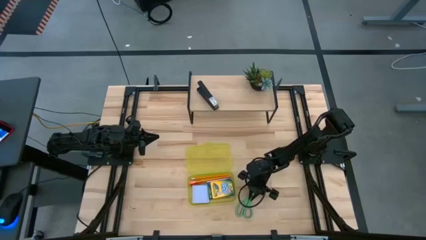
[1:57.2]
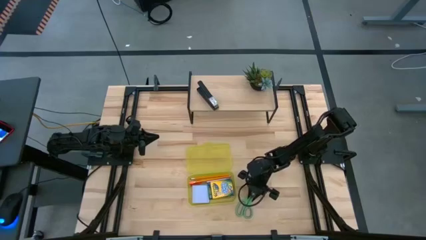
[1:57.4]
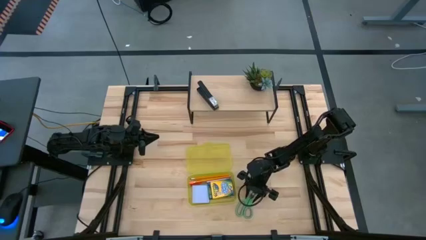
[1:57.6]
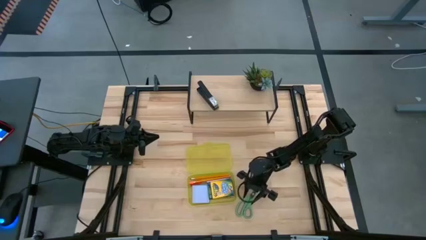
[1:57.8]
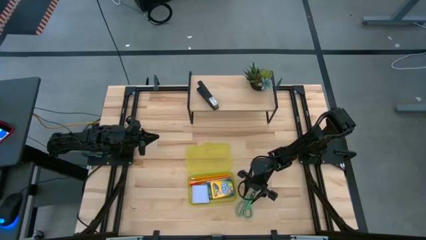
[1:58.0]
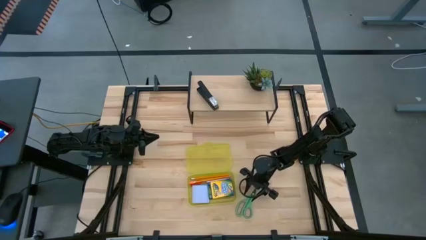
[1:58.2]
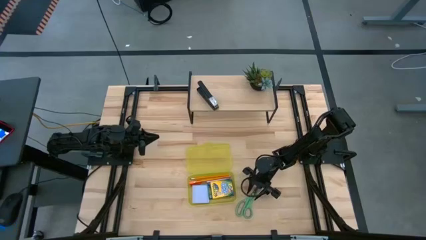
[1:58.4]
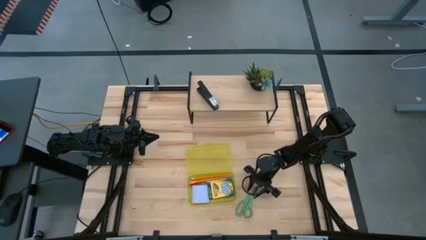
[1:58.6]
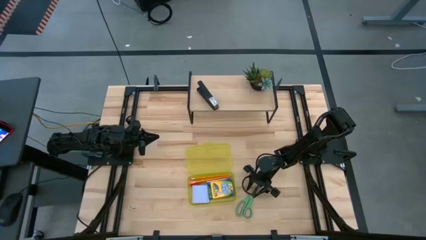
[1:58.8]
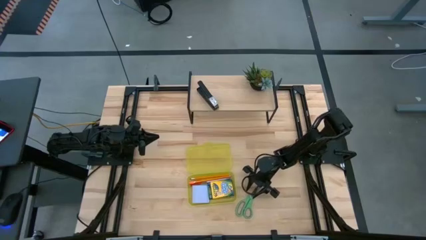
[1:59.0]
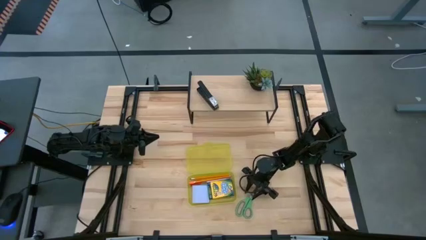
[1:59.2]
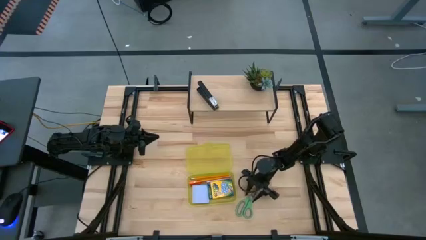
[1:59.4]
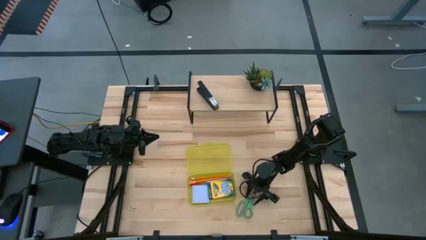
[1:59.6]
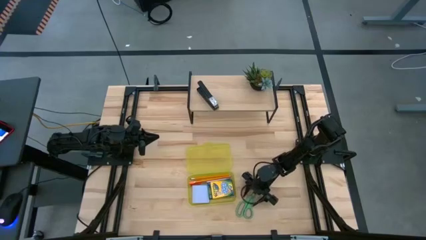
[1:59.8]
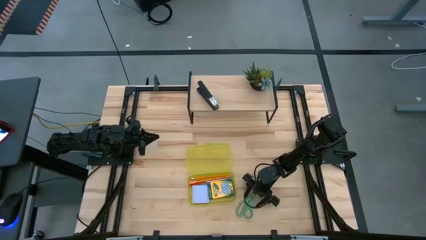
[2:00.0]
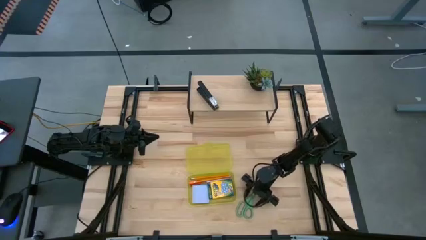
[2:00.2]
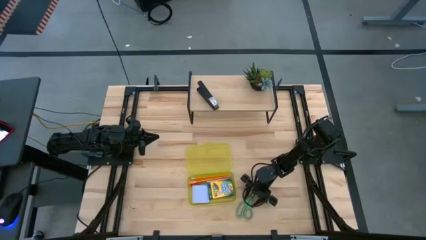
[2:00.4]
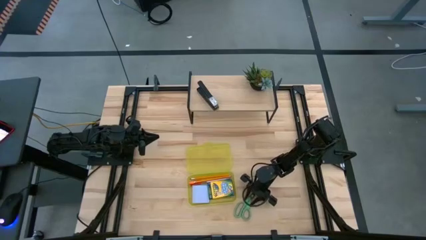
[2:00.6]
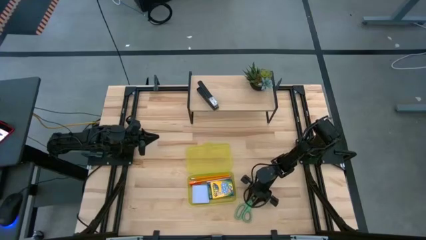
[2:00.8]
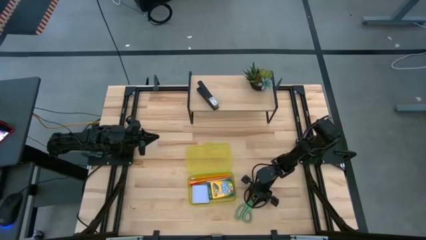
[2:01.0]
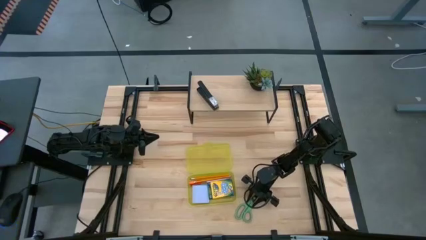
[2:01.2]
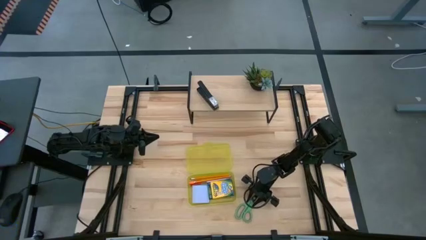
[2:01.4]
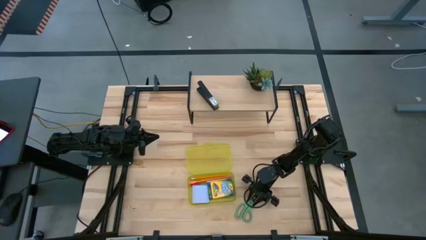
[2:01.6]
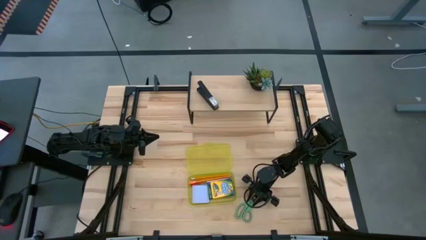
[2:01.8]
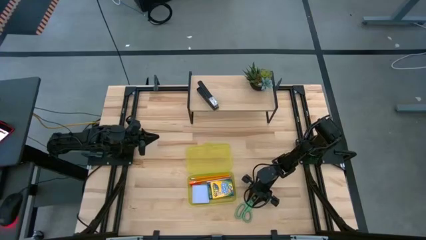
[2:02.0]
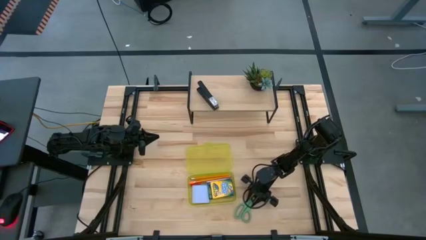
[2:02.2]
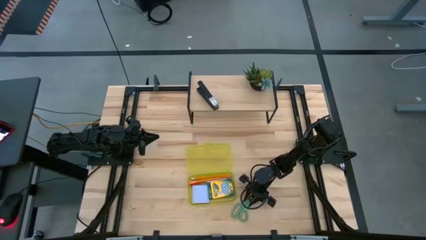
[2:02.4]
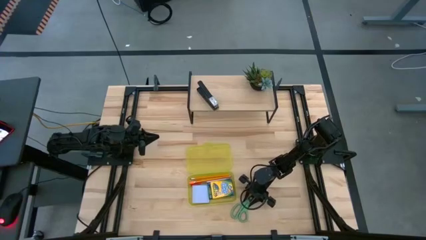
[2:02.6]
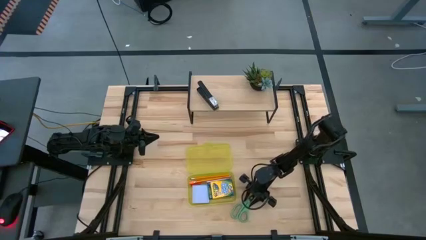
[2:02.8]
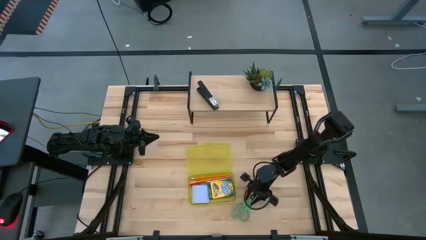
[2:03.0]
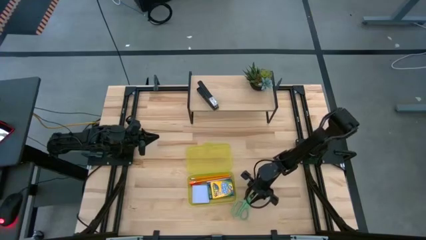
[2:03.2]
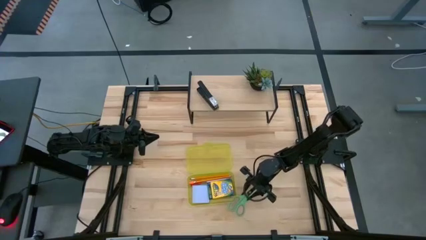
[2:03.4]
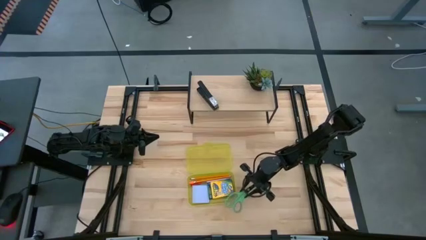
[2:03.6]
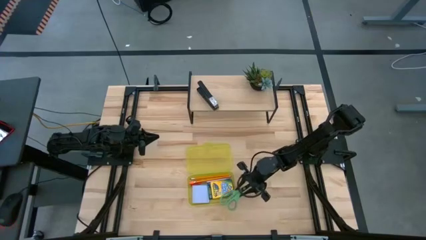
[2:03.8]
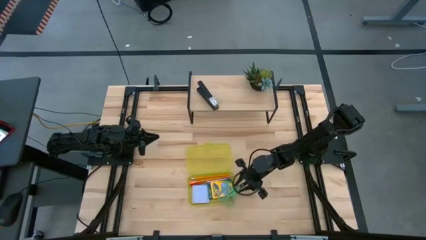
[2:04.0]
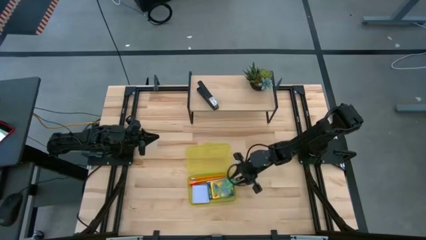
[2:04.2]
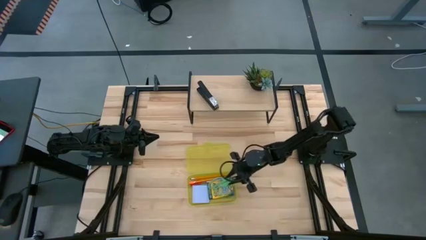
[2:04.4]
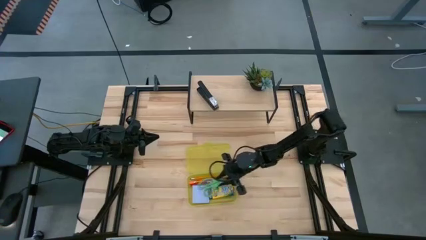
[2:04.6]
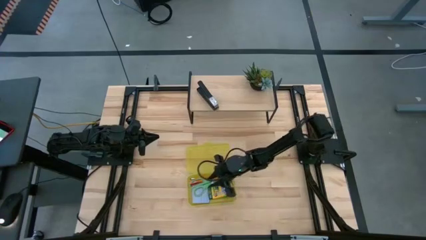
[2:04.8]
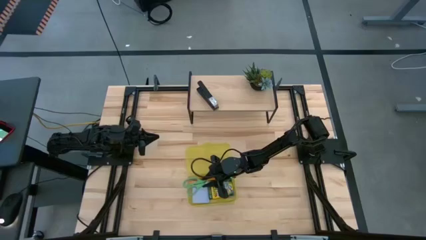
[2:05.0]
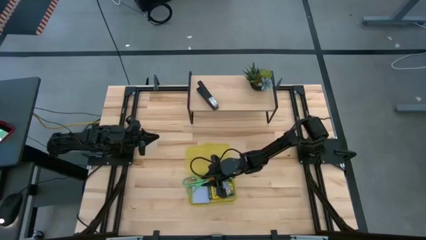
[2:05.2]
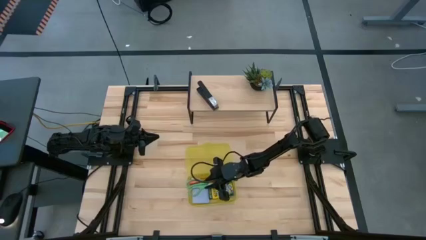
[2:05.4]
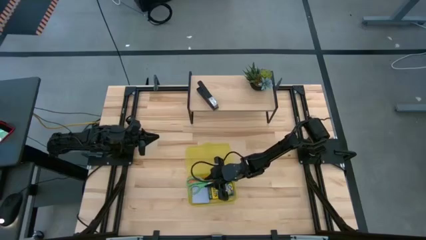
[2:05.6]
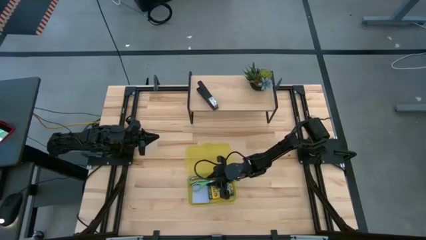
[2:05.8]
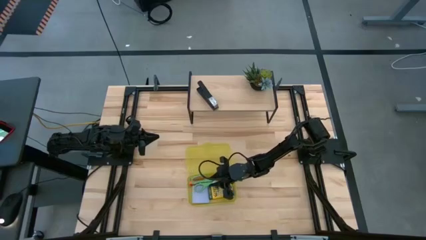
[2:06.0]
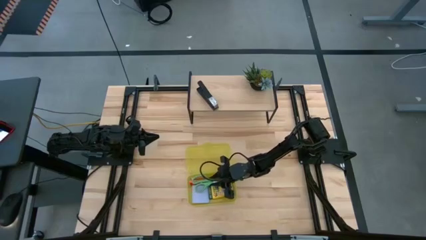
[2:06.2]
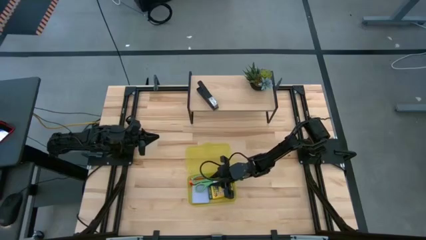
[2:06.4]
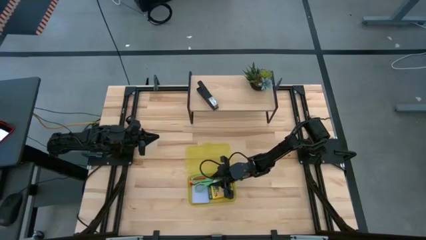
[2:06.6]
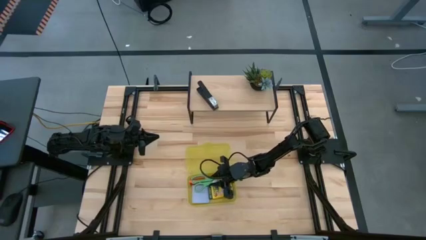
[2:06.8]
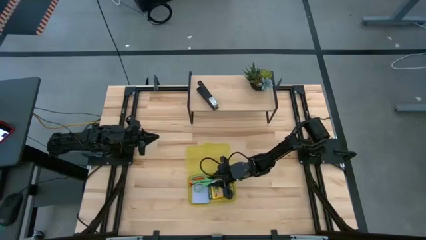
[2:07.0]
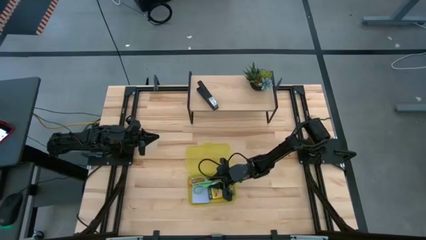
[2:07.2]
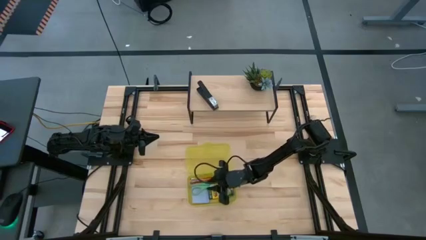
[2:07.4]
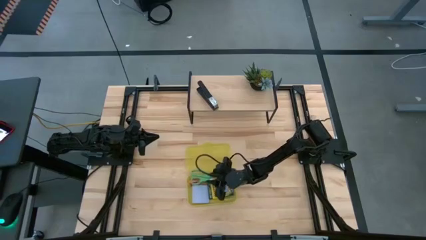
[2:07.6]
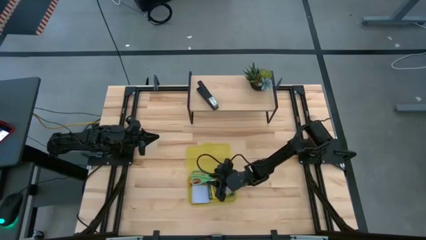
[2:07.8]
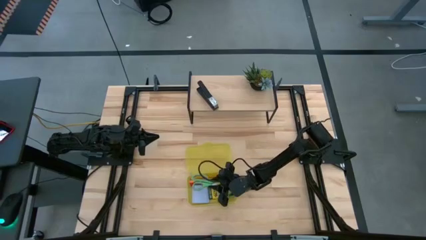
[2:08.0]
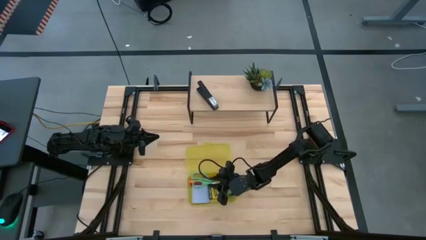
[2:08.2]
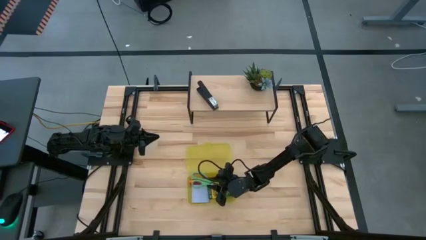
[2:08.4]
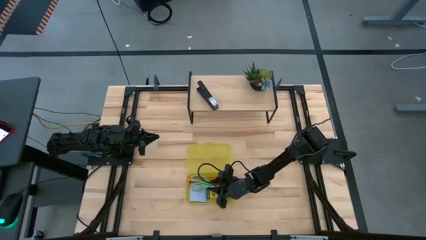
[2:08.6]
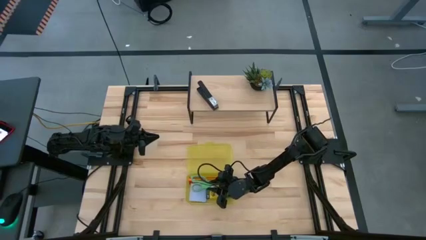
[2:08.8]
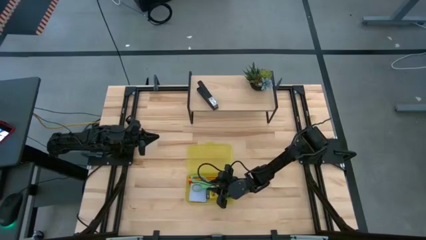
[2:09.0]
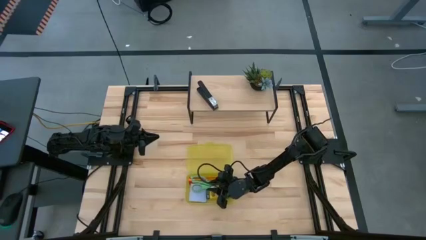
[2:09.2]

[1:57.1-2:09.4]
Task: Pack school essentials
Put the green scissor into the yellow supply box

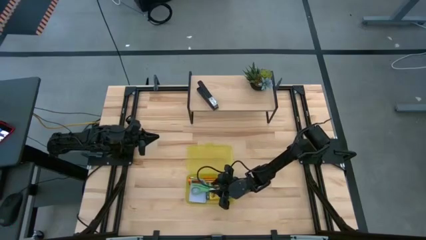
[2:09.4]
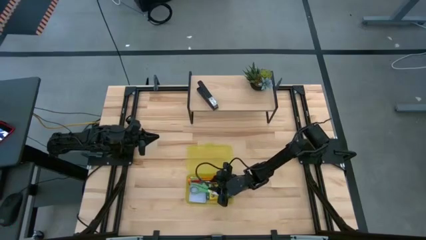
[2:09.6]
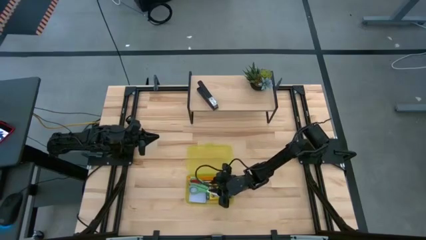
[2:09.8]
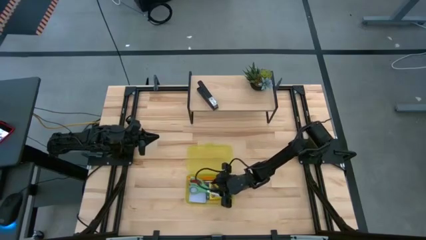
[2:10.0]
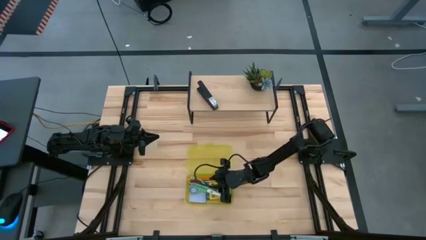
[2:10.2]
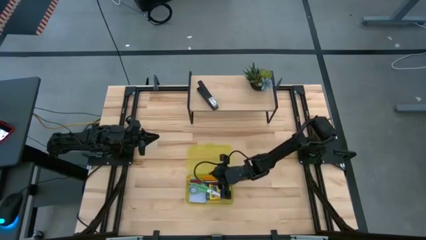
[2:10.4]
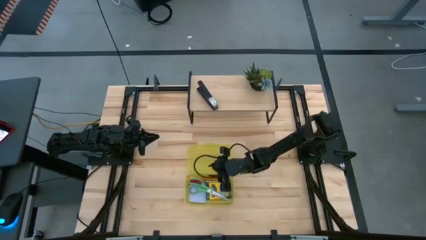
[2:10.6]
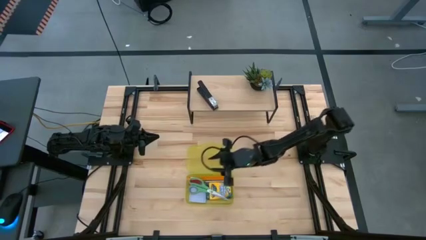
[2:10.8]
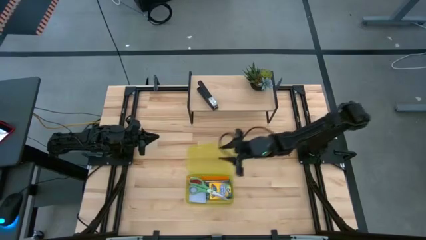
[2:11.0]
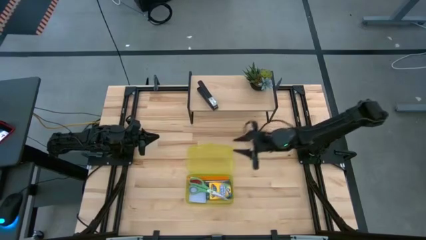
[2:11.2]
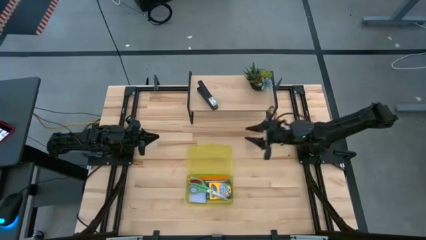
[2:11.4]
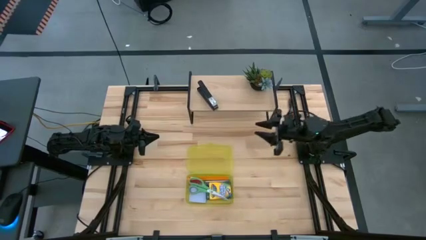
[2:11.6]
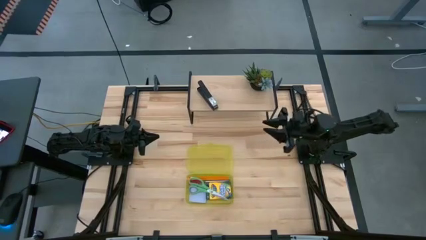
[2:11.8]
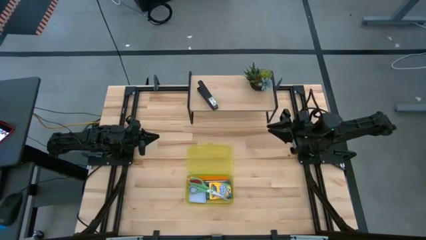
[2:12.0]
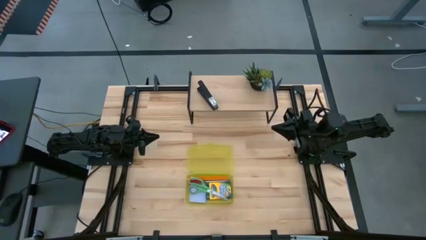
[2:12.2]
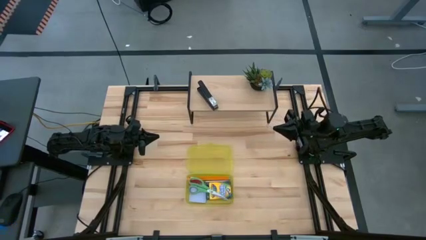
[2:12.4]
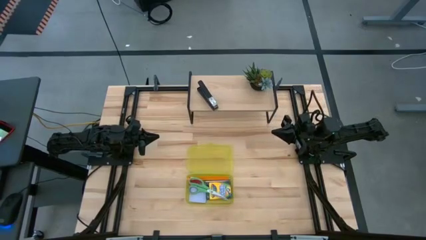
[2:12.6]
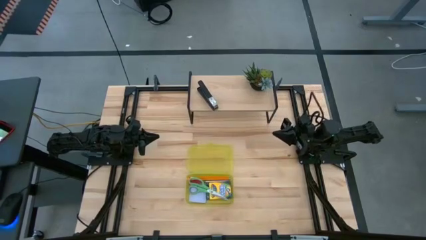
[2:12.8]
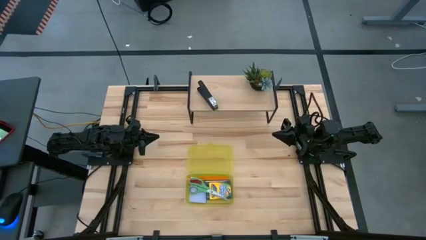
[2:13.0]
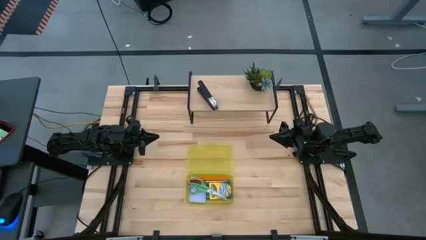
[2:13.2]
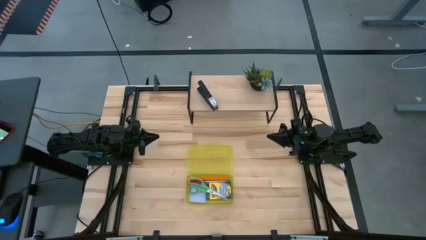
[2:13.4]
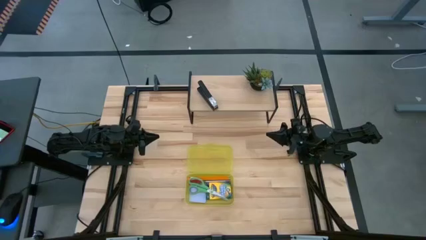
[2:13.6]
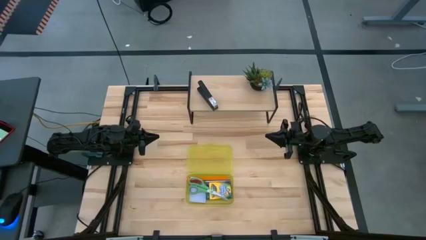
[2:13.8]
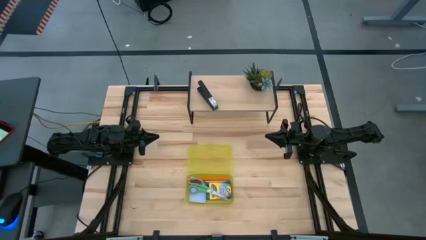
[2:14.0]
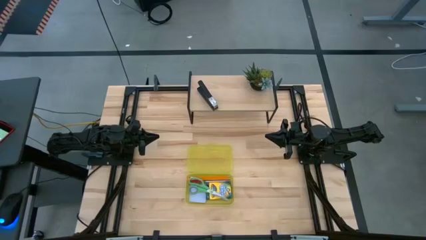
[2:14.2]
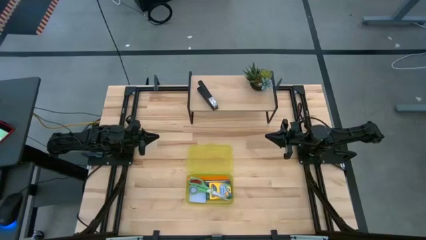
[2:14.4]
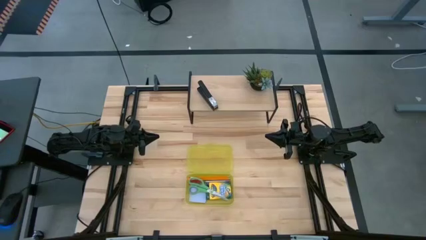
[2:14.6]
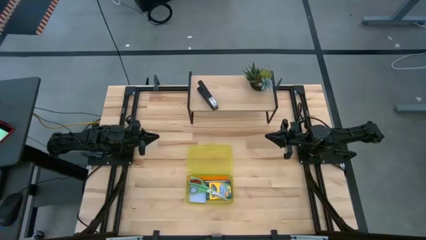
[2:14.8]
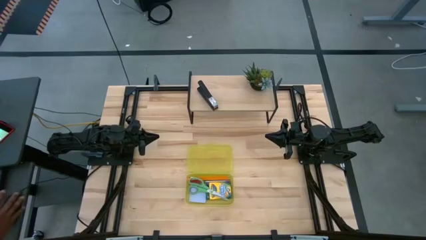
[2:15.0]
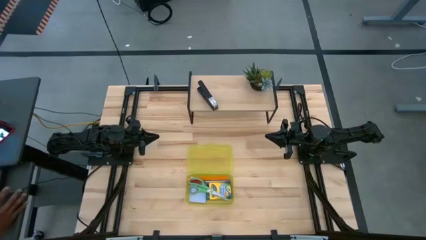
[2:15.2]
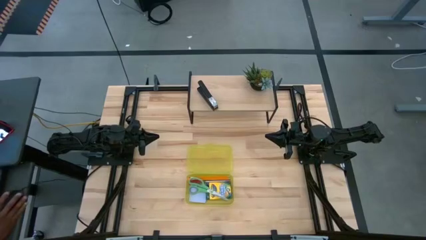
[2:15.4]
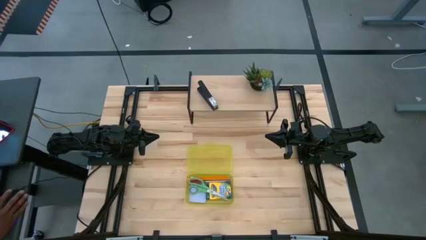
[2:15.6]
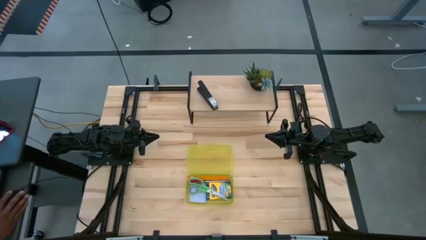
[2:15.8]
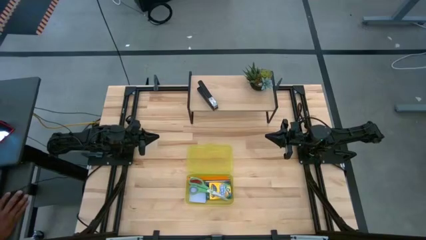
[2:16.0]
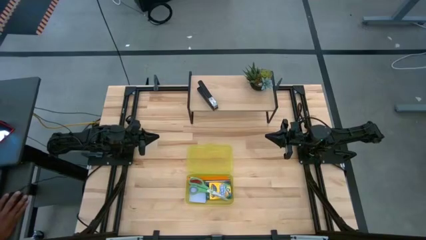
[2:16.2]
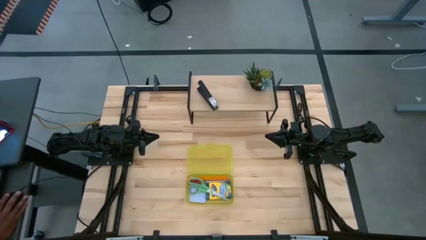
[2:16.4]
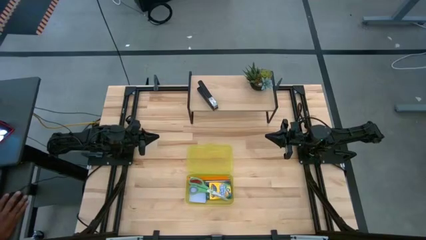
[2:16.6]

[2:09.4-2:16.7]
Return to Home Position
